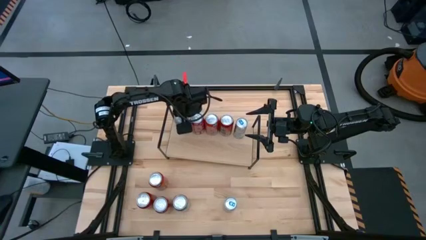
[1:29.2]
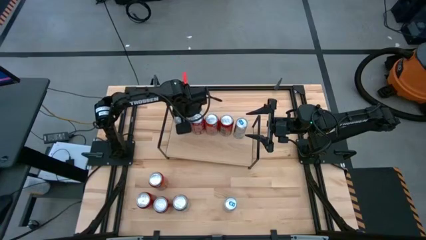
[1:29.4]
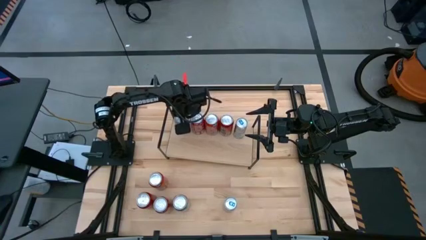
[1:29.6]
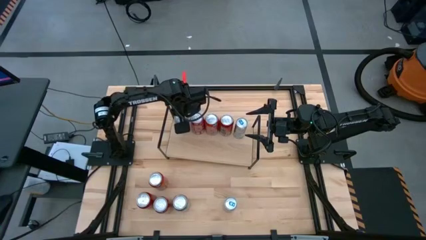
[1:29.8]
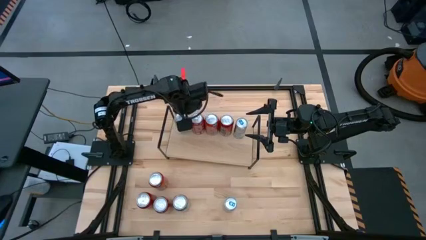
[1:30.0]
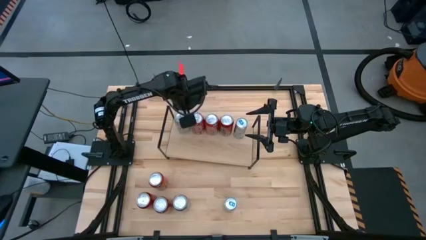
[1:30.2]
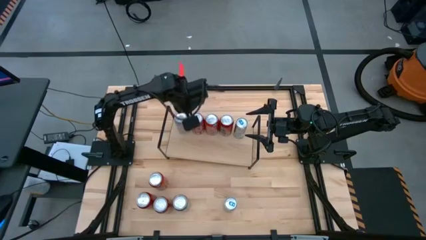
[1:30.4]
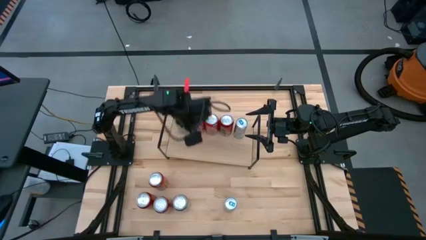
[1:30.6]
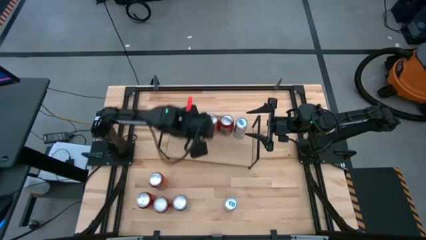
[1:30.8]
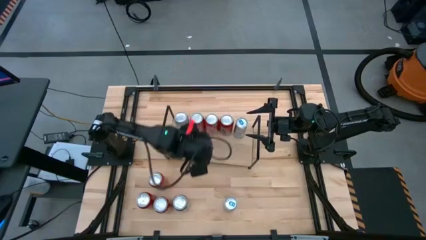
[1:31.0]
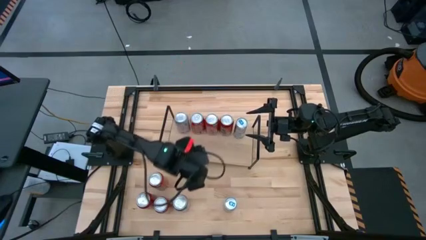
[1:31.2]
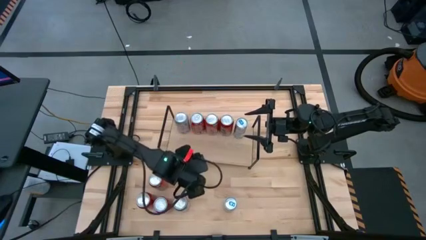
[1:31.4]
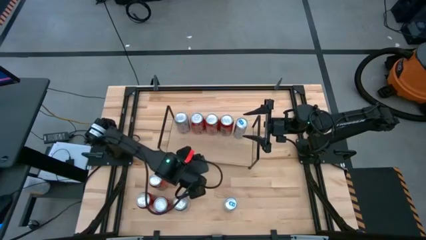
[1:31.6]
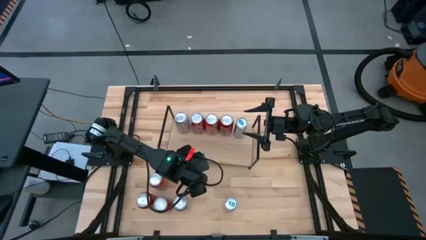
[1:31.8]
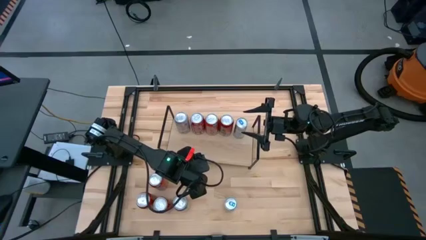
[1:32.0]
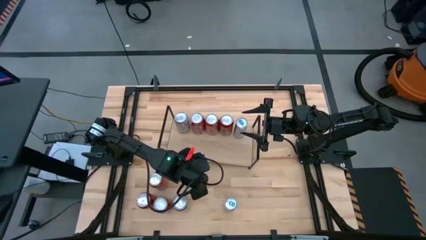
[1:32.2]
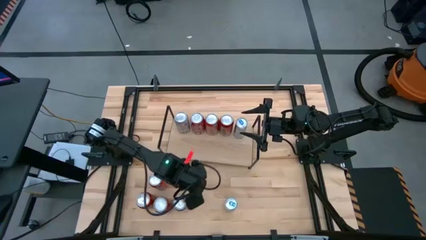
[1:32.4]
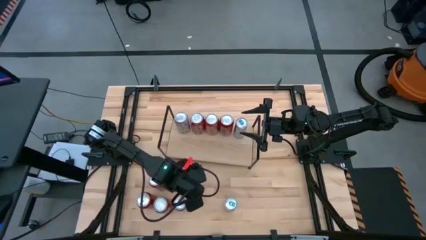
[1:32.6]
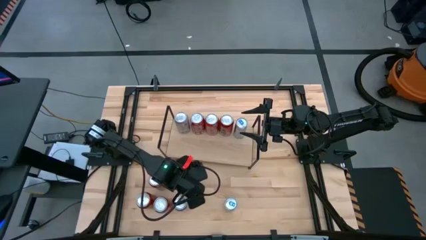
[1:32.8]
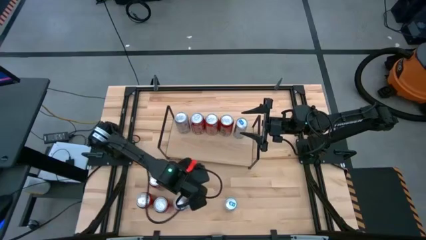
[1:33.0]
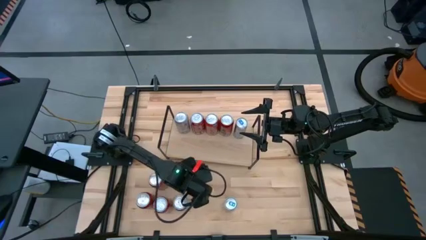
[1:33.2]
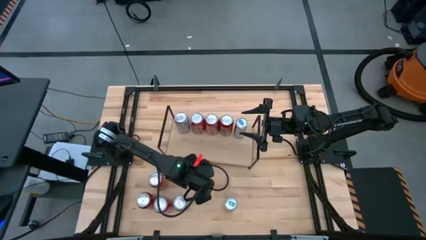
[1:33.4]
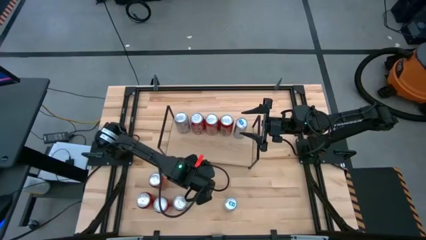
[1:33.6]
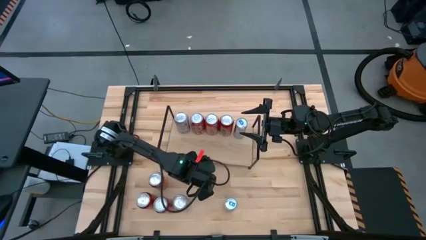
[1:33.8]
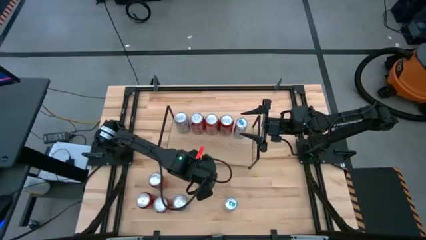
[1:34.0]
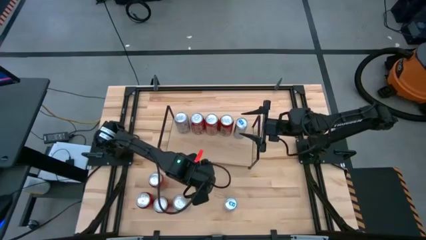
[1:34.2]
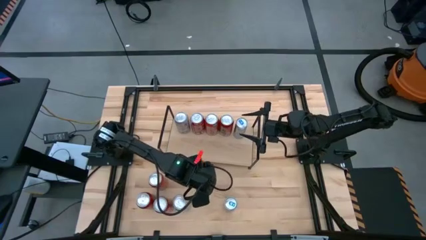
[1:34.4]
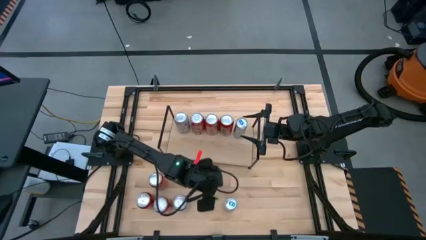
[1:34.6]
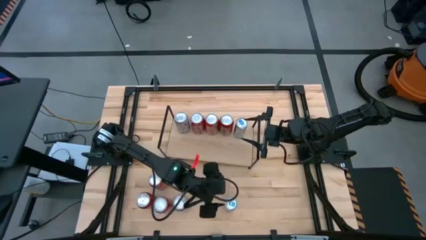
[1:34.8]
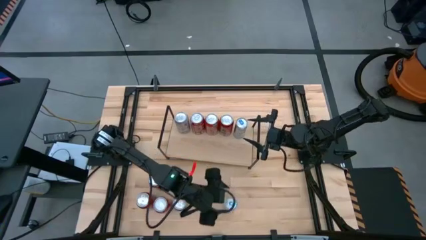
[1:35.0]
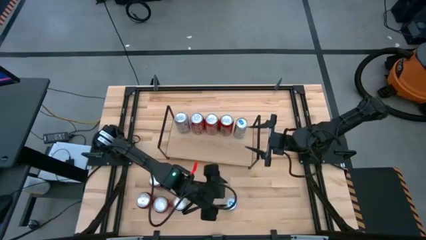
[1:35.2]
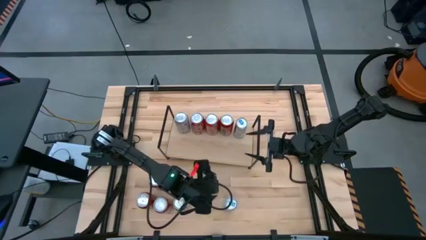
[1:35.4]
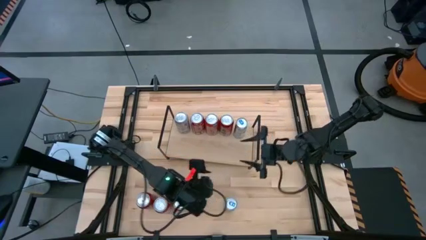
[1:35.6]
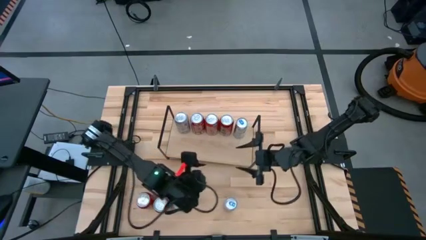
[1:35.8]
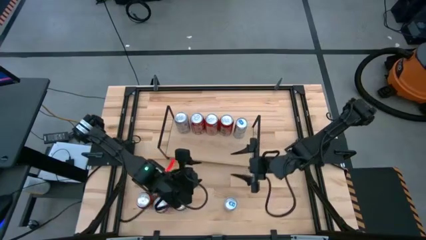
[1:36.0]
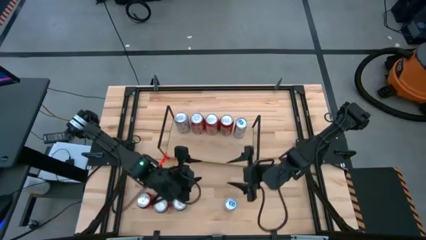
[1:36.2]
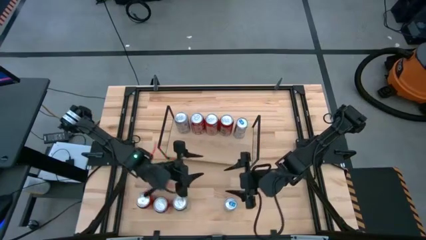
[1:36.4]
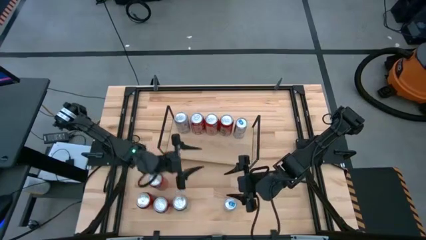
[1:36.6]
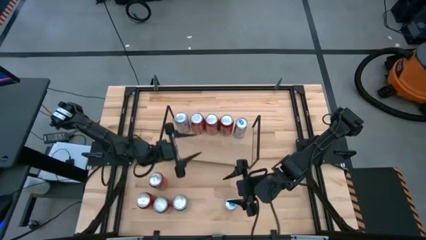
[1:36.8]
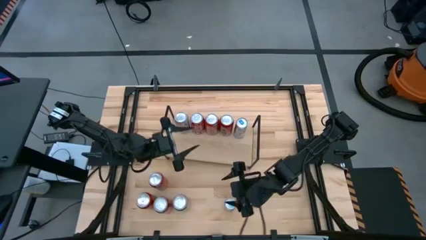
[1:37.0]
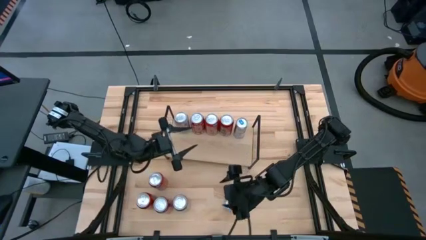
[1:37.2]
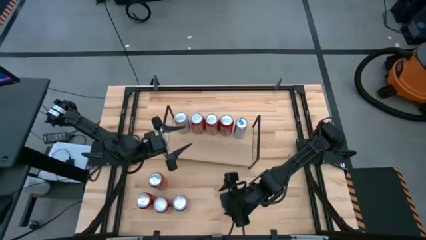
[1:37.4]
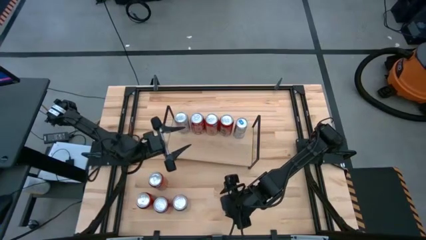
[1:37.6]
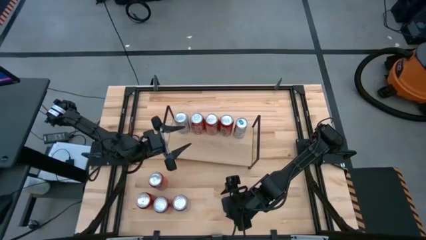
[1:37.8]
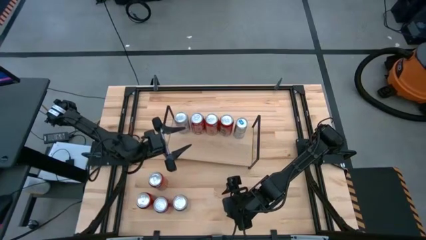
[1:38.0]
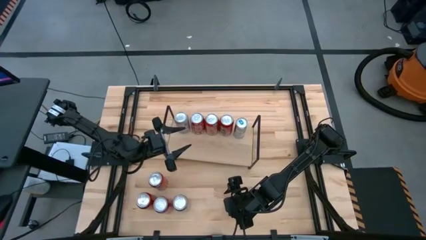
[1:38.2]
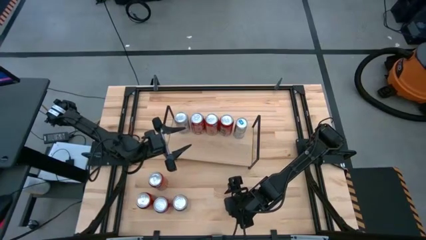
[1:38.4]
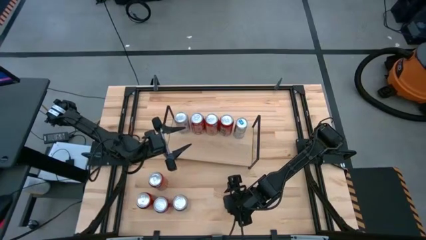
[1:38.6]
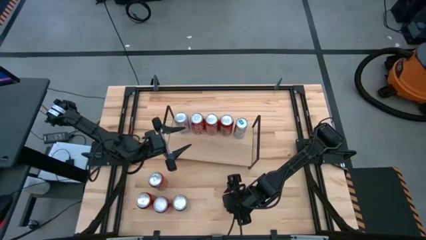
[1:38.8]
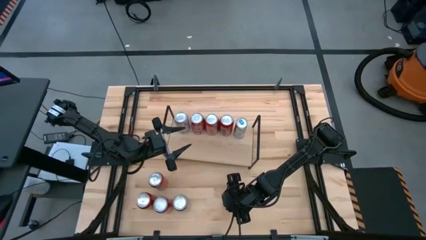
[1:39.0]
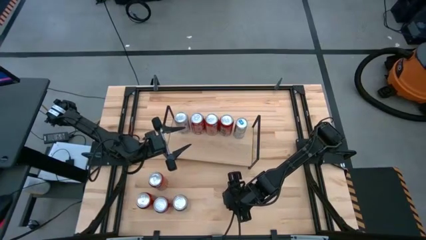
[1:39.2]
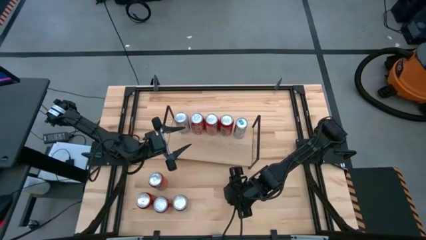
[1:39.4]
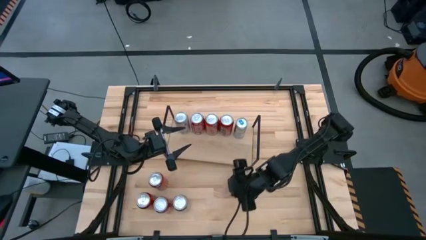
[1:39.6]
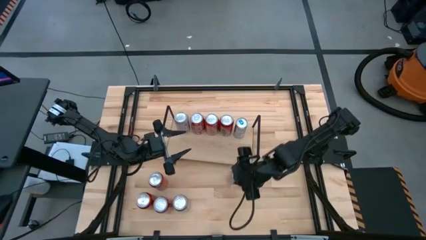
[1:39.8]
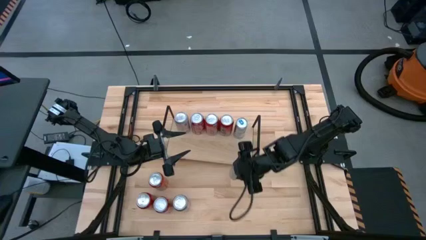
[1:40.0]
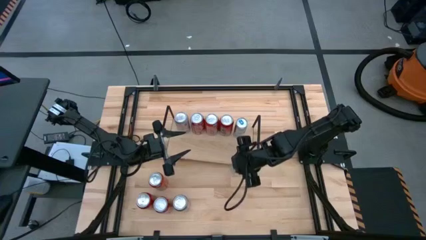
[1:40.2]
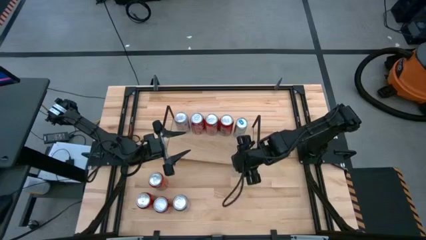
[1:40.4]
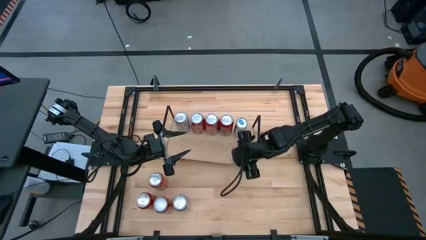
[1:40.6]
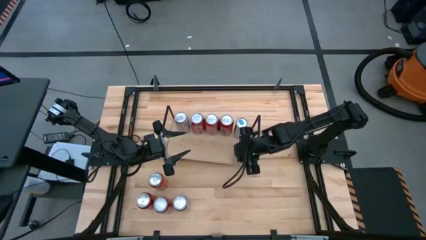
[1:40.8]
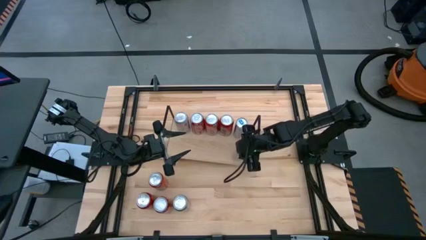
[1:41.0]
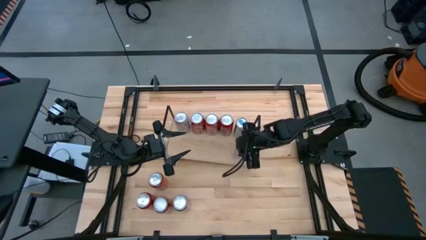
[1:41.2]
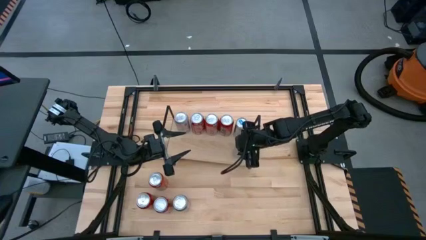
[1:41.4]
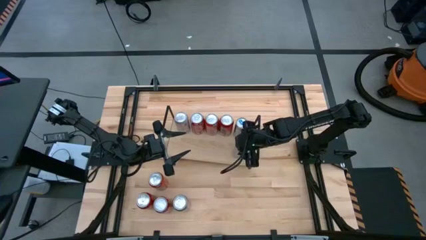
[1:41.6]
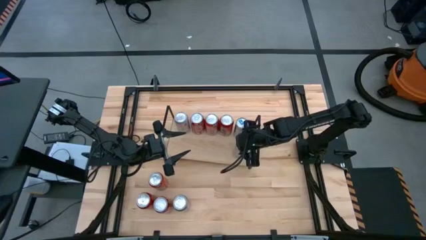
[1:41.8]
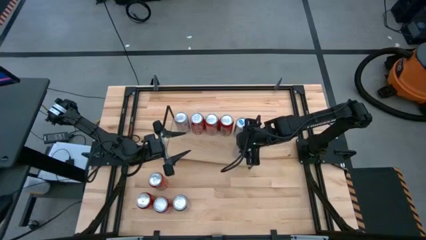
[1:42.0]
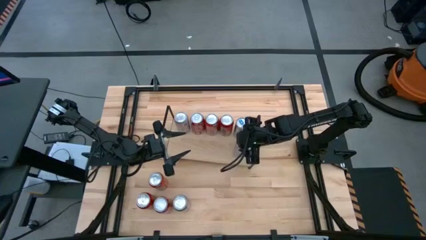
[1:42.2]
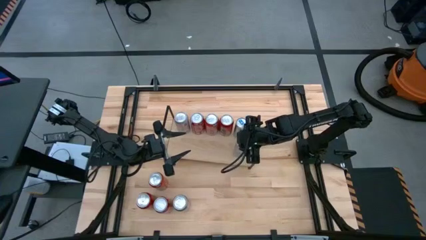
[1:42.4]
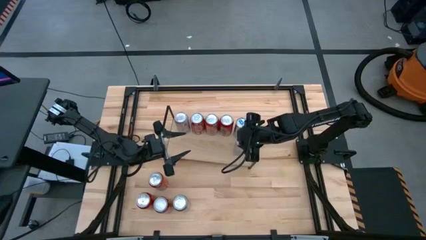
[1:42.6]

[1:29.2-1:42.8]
Task: Place canned beverage on shelf
Put the blue soda can aligned with the other blue soda can on the shelf

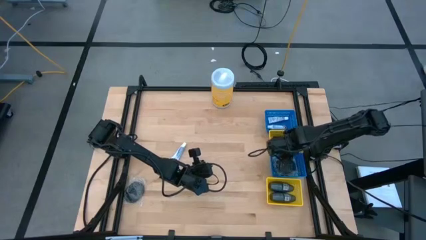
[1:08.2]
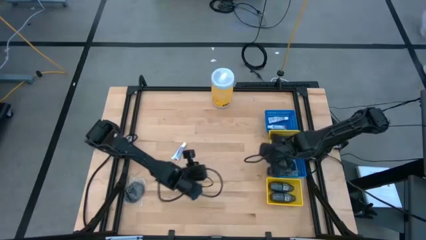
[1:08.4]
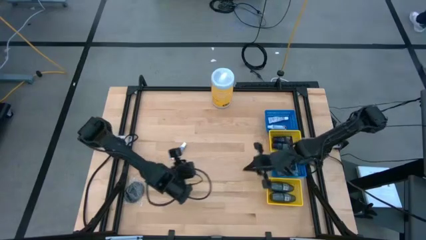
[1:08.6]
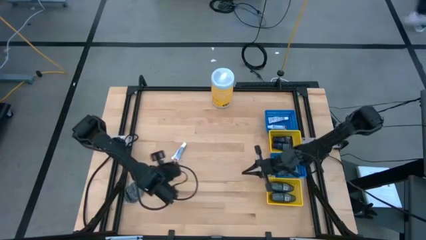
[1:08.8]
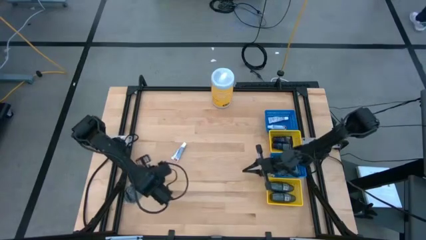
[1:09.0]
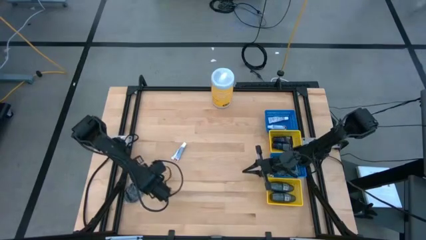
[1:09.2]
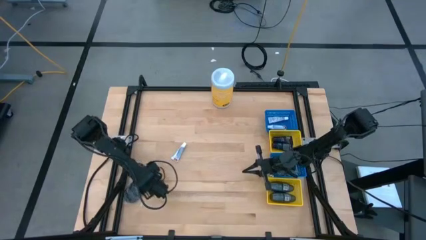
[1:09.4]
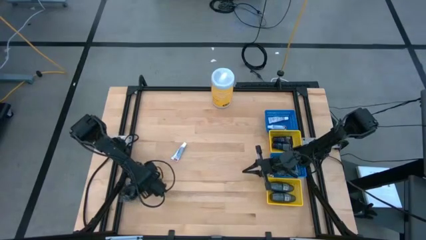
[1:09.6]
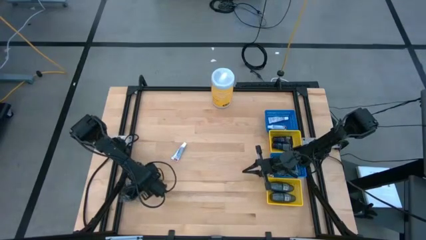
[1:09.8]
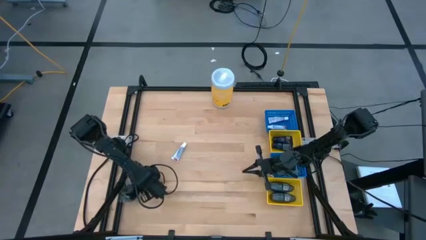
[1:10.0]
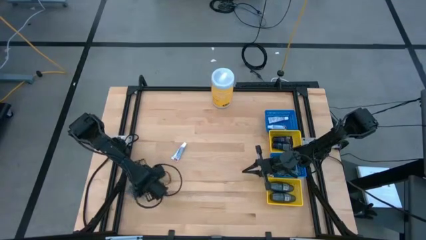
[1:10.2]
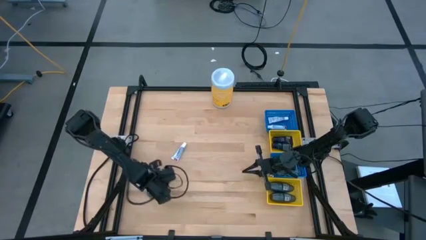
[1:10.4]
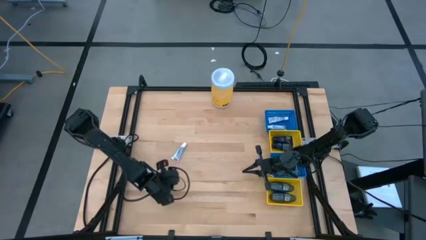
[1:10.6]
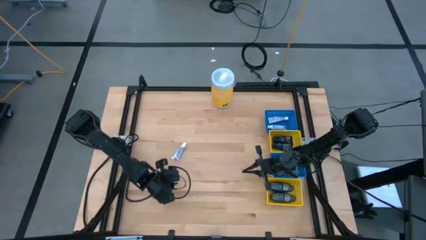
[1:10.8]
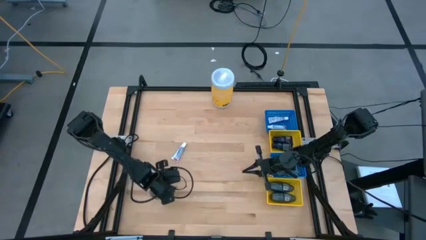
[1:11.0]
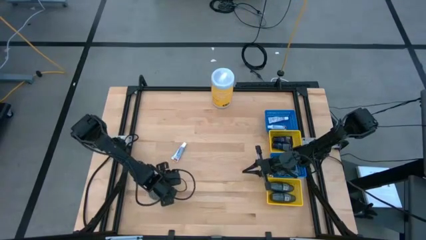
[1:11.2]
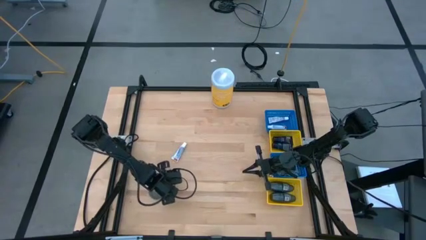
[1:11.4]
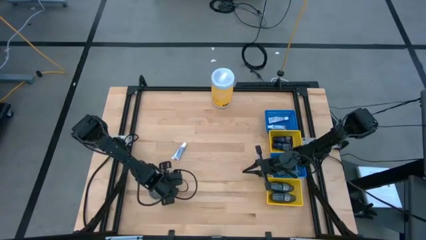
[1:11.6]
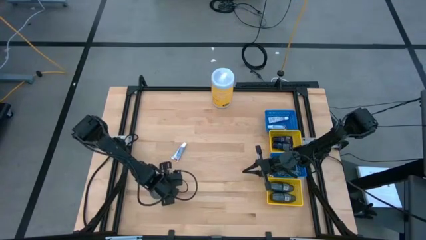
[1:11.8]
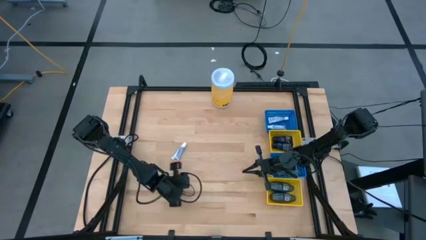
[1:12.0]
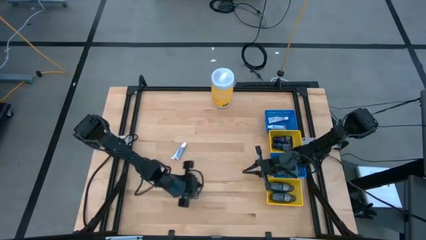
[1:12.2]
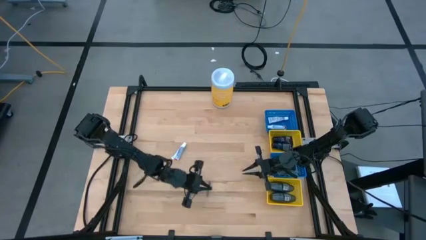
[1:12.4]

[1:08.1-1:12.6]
Task: Pick & Place Travel size toiletries
Put the black hairbrush into the bottom blue bin
